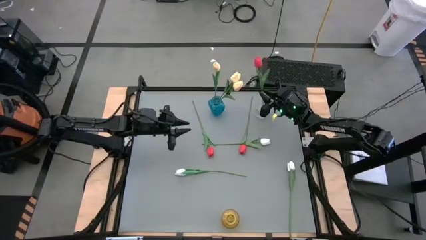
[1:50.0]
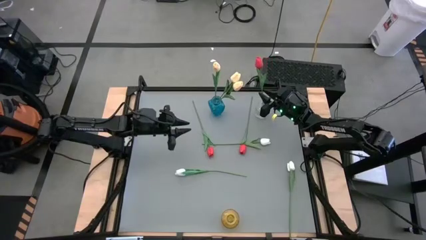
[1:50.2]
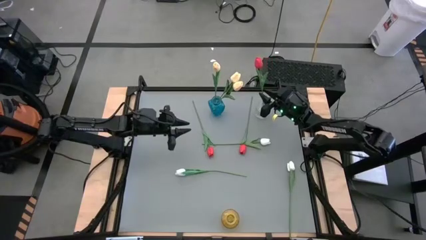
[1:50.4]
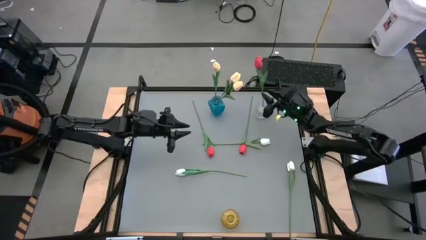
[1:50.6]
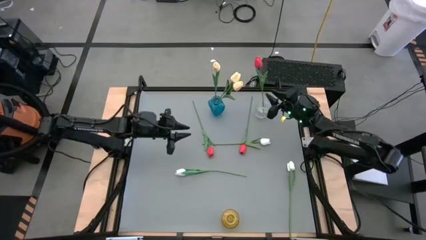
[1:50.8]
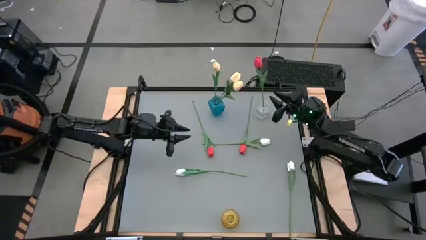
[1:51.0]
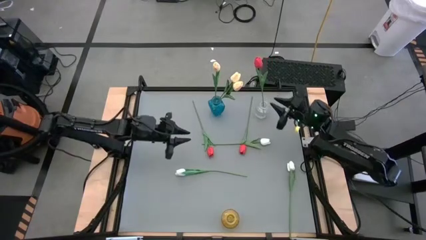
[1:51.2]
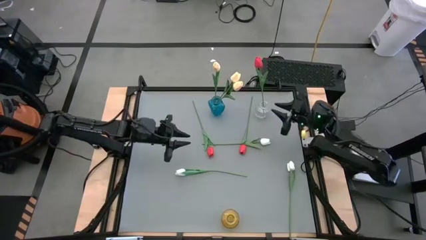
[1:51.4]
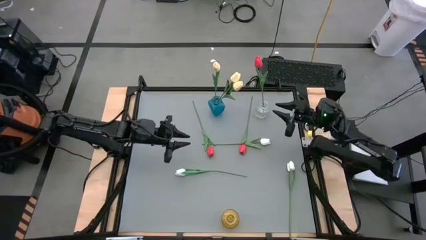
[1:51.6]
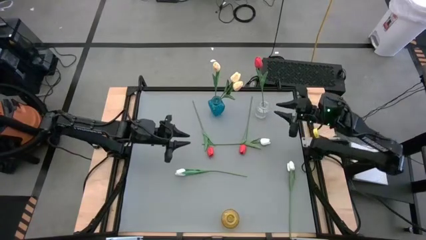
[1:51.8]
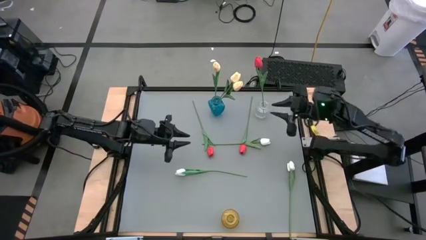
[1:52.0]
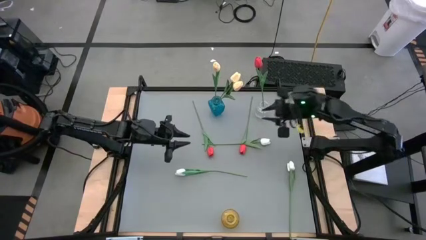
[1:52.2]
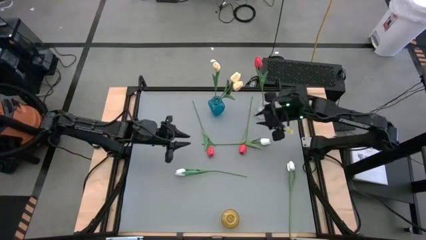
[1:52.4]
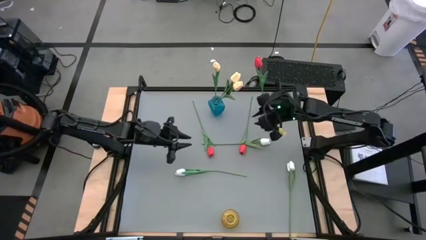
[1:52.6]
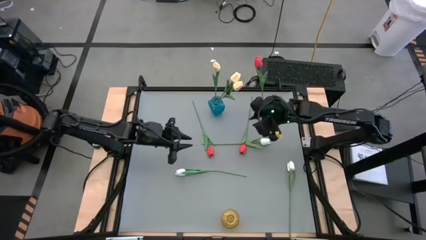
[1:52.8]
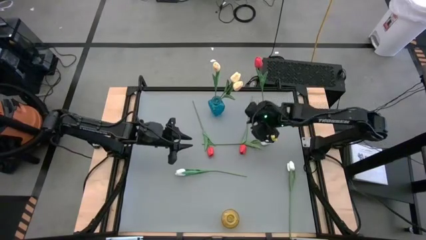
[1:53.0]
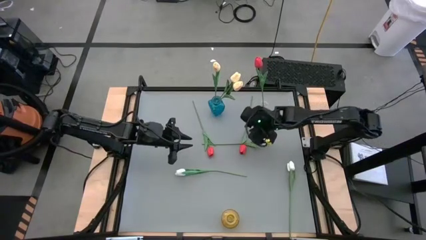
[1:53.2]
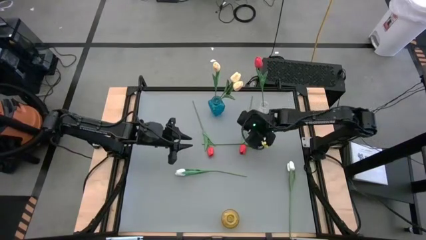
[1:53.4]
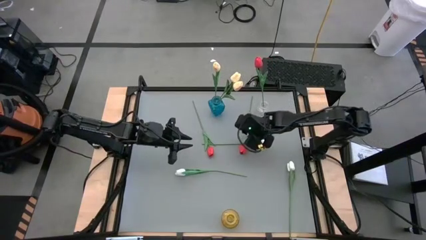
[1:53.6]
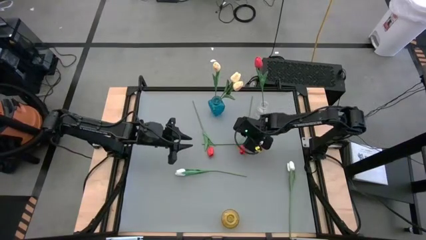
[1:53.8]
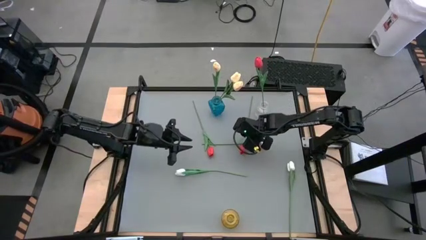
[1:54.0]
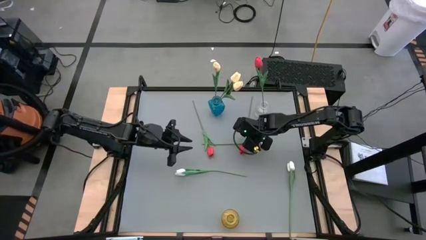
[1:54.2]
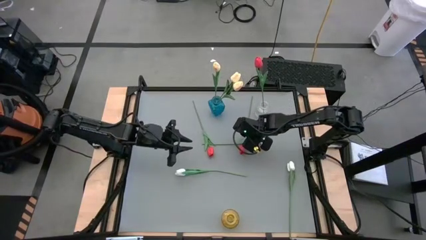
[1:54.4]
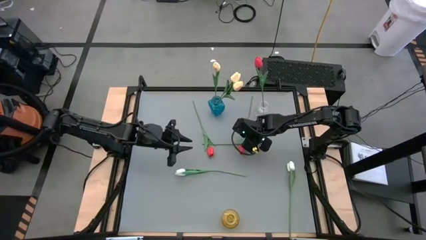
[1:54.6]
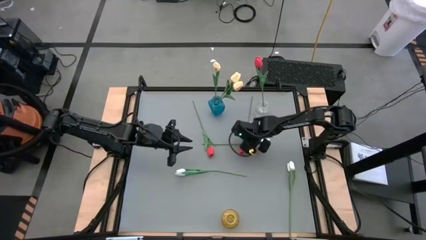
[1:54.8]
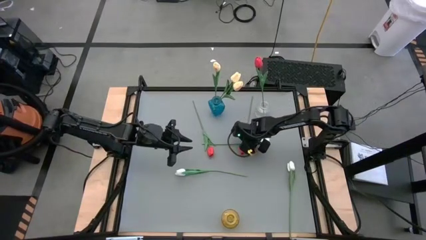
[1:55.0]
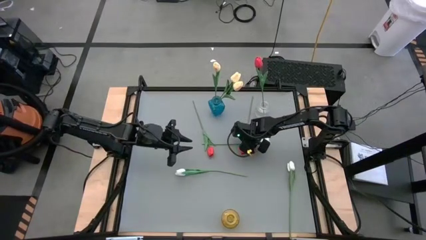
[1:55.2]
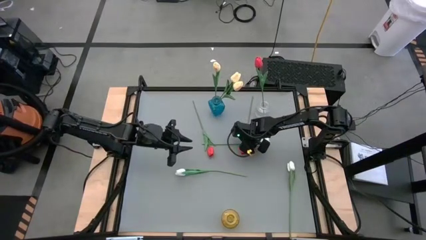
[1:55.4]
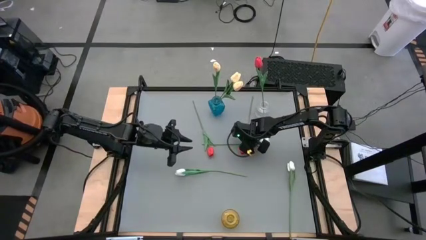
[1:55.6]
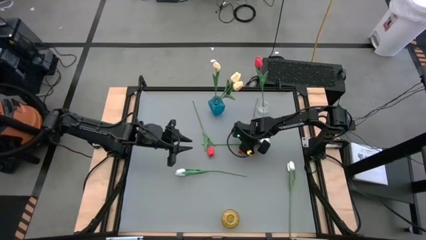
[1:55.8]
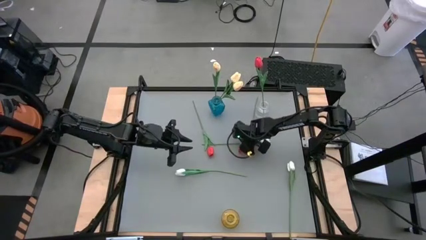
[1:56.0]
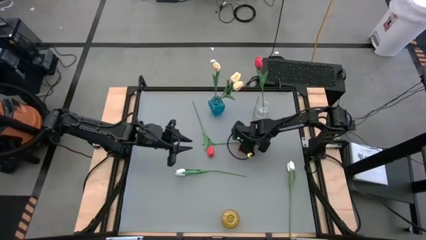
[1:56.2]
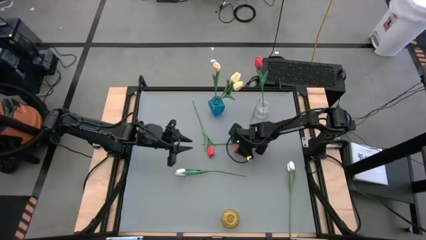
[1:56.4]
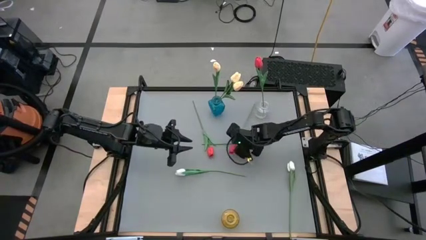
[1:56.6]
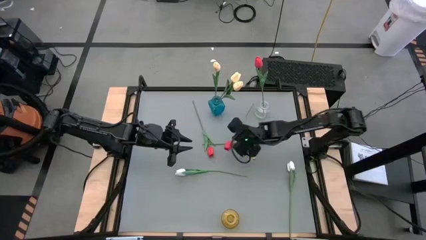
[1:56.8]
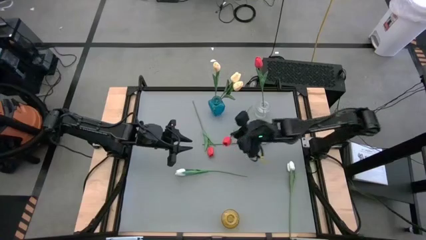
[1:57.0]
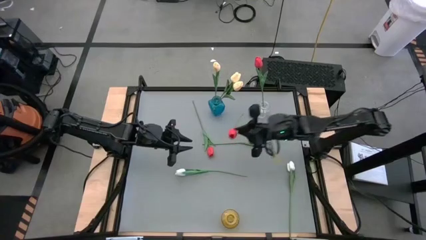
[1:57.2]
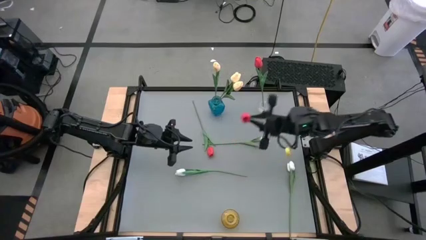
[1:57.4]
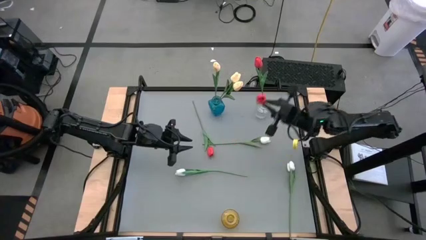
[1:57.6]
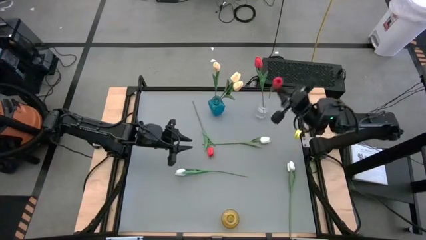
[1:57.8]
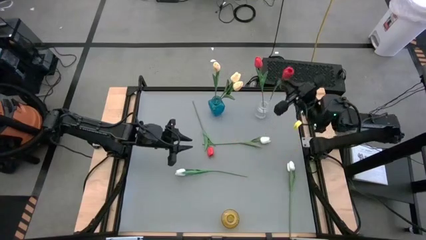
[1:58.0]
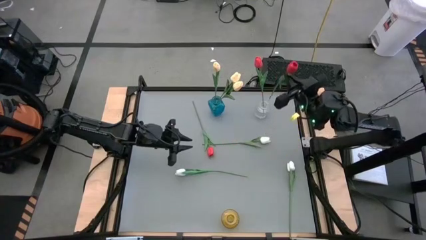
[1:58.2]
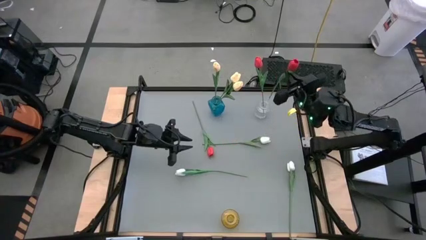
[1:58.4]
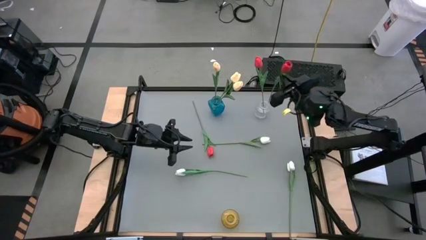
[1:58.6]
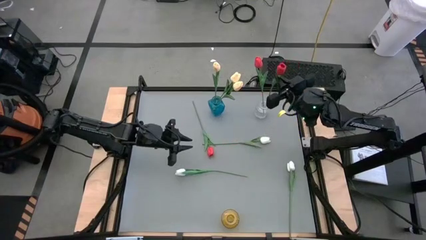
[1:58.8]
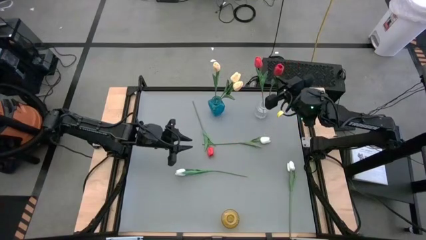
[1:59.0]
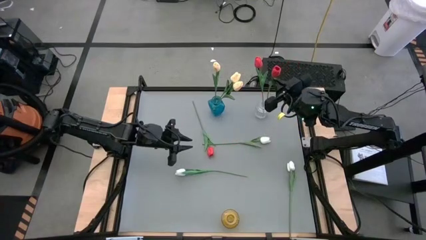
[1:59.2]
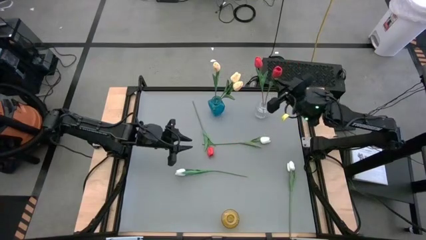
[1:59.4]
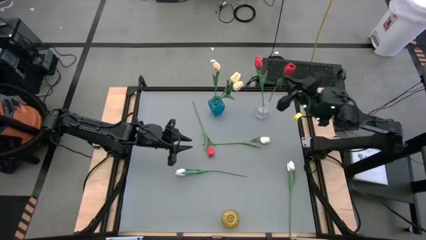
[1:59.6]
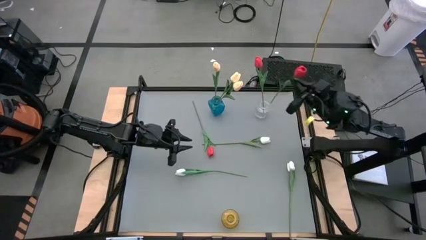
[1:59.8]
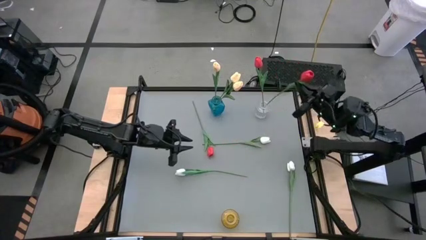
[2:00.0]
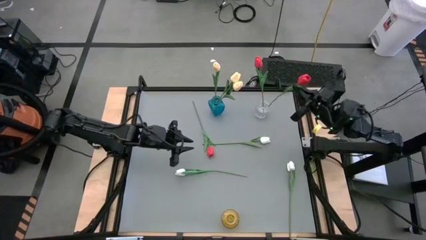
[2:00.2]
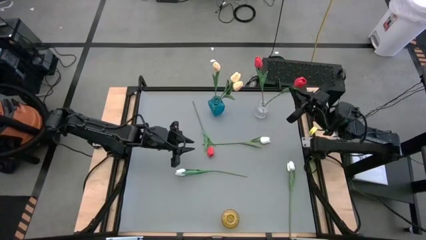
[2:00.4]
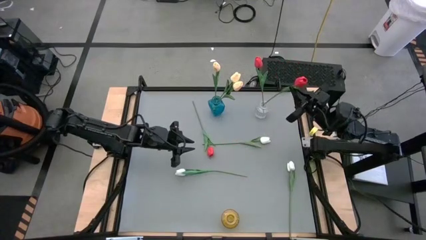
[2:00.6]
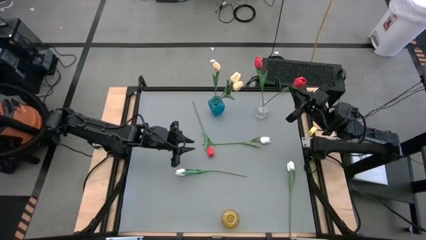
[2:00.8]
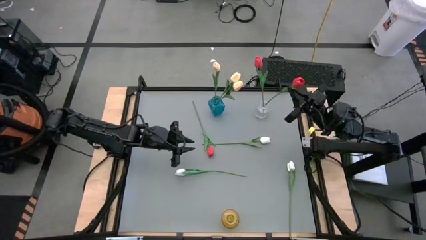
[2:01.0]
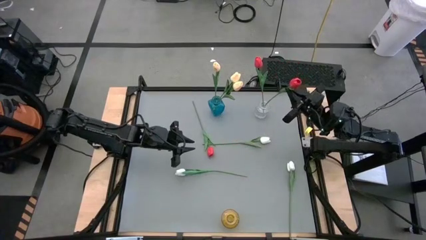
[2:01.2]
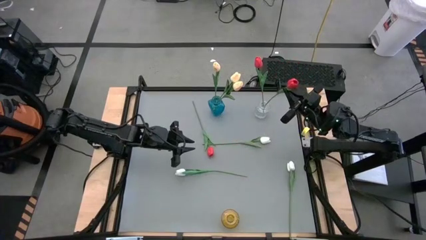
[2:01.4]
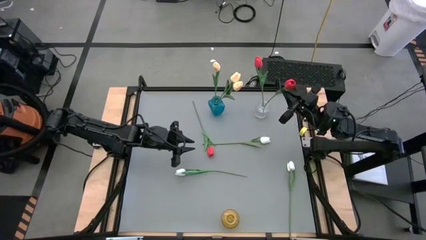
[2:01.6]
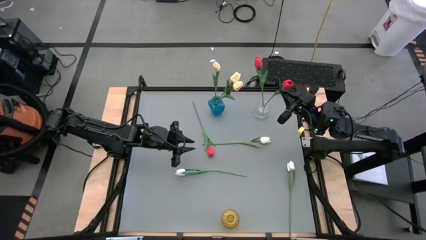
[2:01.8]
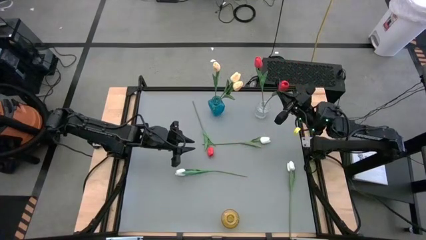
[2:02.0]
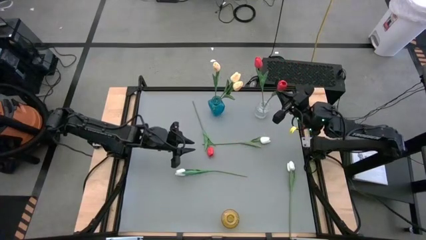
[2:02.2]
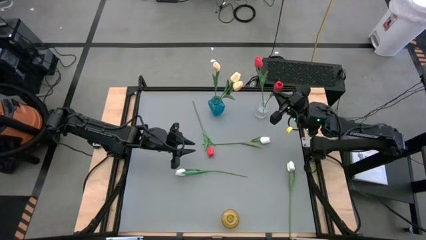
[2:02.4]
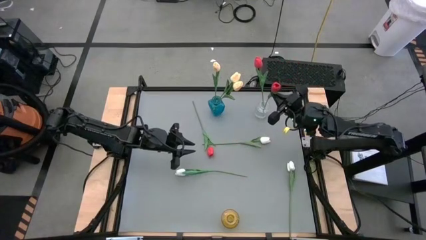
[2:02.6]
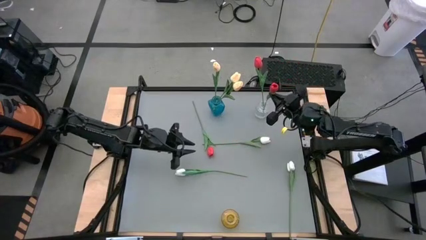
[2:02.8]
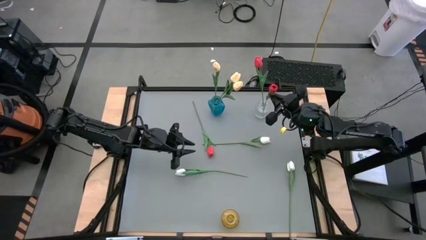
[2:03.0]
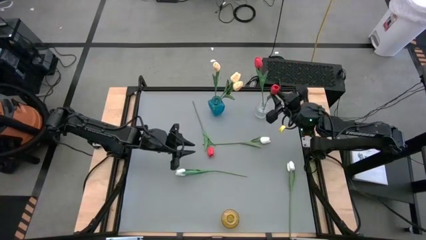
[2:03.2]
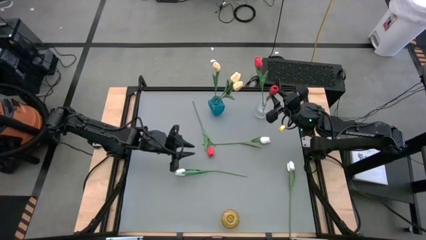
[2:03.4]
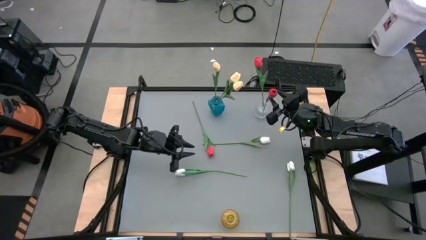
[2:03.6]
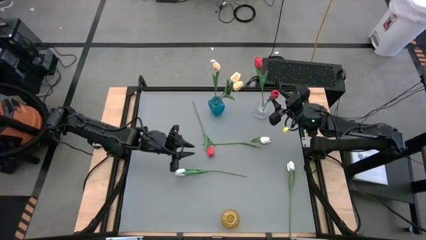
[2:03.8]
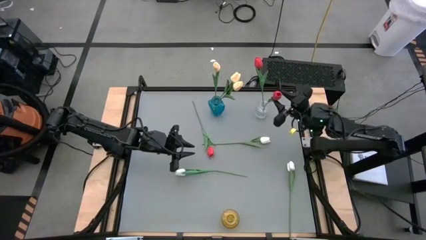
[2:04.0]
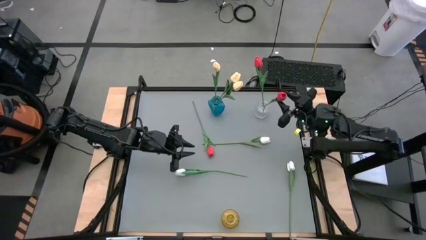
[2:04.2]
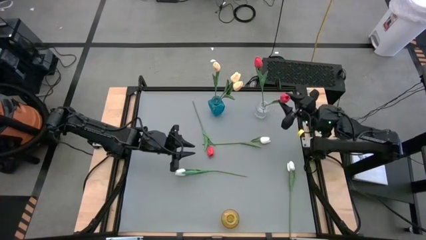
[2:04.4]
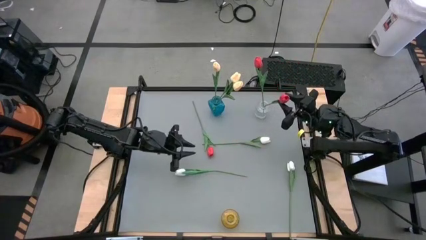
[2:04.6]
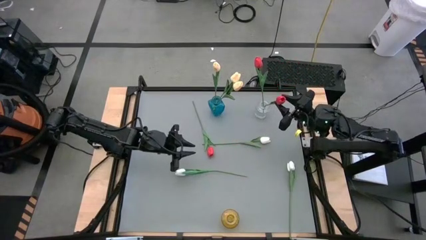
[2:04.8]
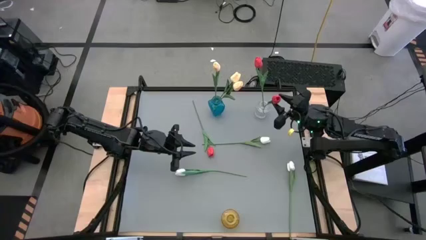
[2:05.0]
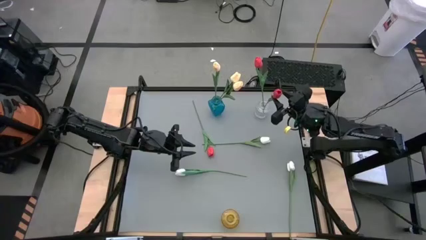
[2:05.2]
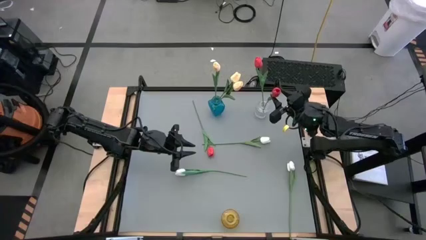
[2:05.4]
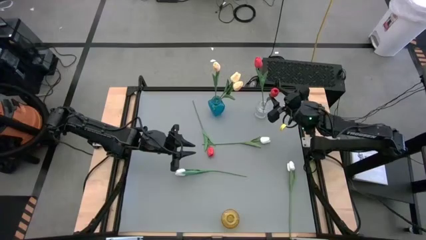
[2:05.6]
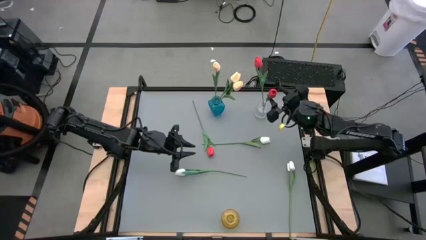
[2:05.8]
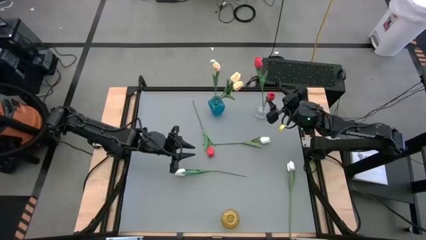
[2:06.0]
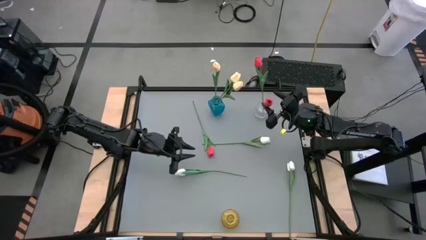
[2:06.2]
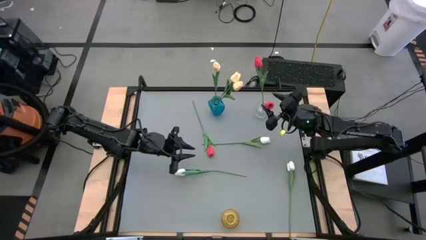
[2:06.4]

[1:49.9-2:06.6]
Task: Sort flowers into vase by color
Put the right red flower into the transparent vase
